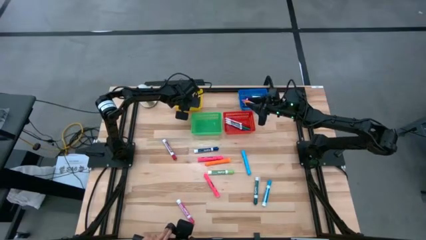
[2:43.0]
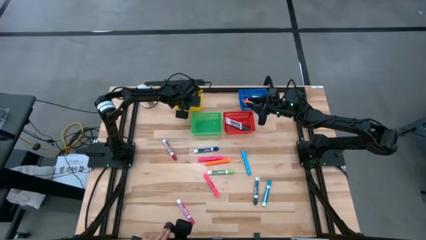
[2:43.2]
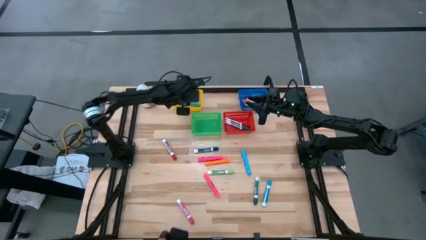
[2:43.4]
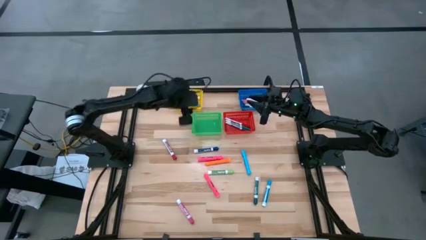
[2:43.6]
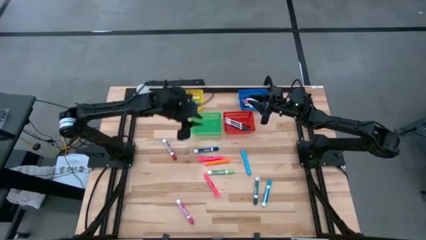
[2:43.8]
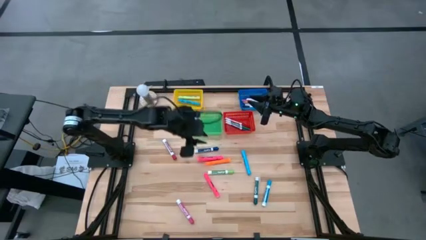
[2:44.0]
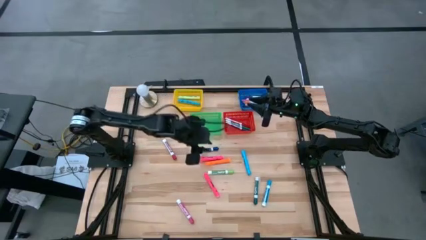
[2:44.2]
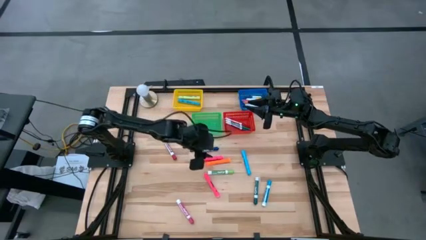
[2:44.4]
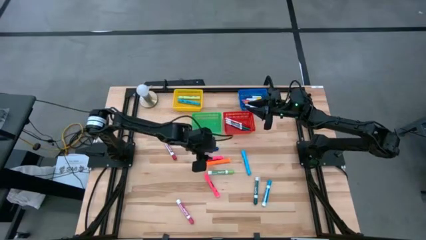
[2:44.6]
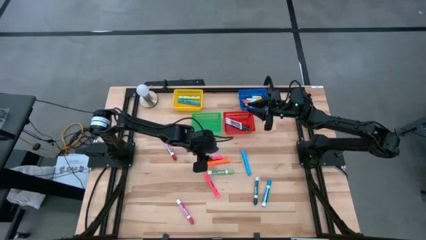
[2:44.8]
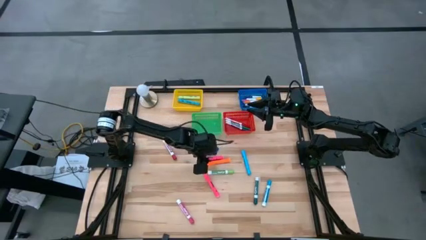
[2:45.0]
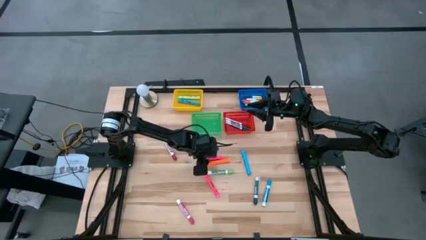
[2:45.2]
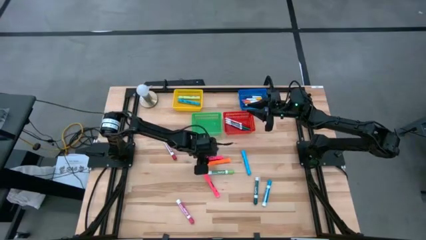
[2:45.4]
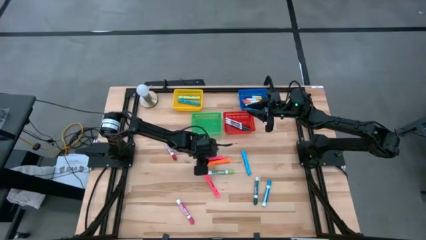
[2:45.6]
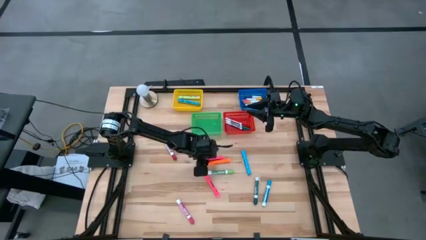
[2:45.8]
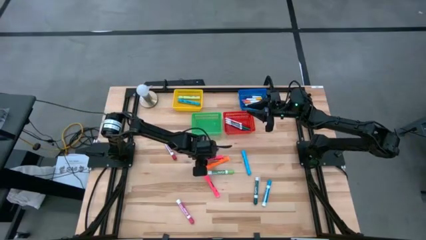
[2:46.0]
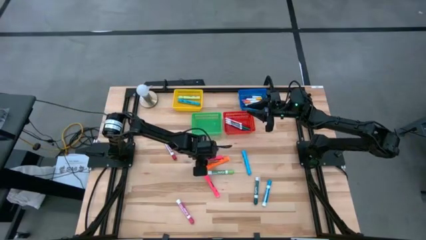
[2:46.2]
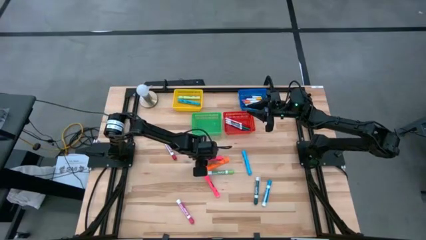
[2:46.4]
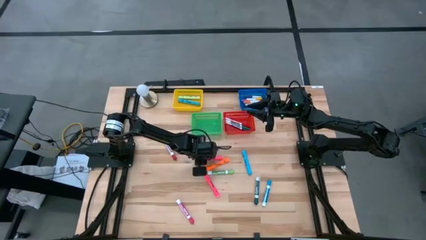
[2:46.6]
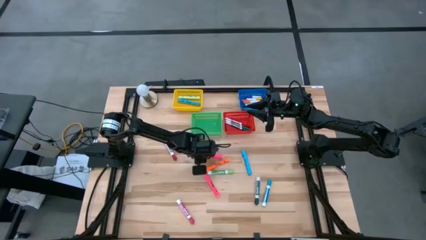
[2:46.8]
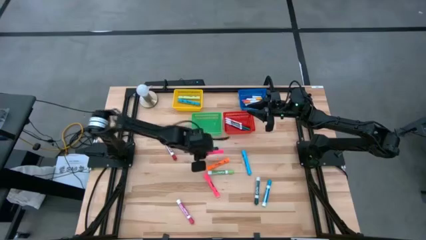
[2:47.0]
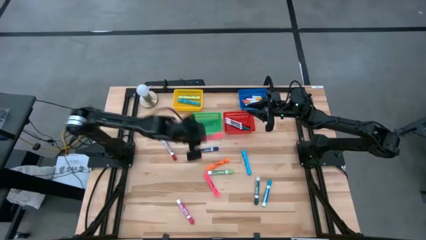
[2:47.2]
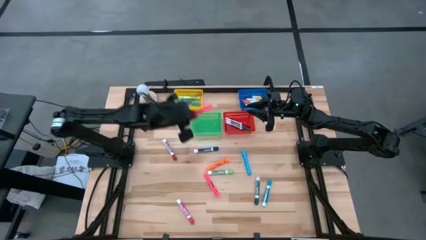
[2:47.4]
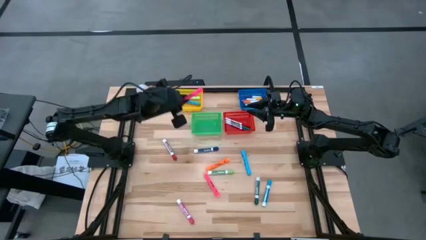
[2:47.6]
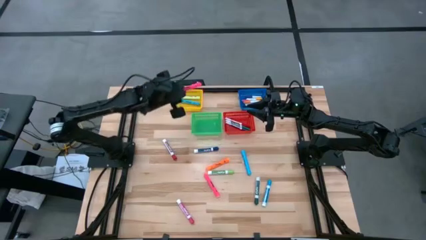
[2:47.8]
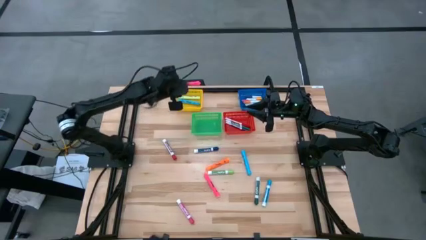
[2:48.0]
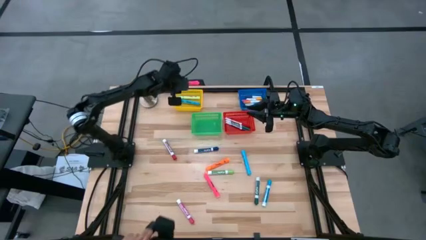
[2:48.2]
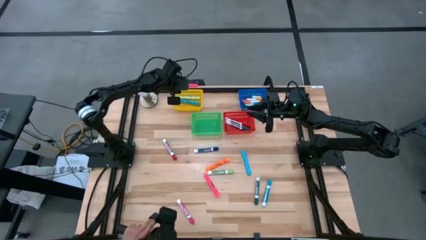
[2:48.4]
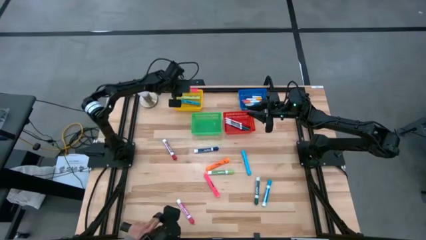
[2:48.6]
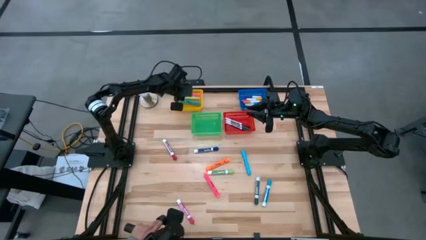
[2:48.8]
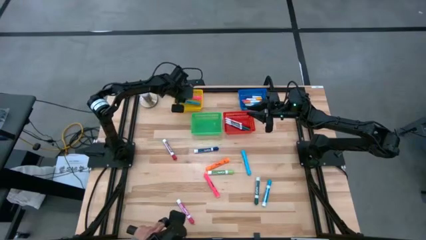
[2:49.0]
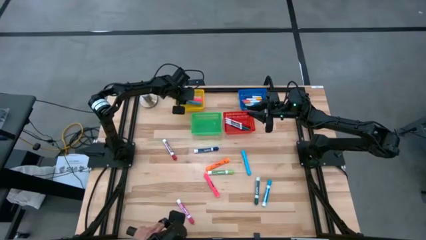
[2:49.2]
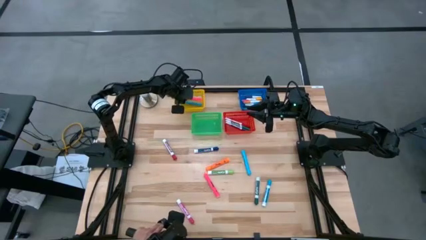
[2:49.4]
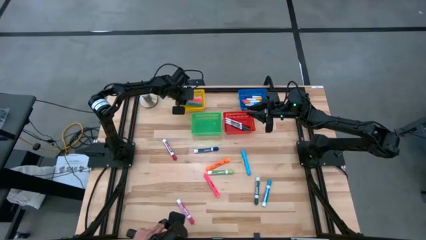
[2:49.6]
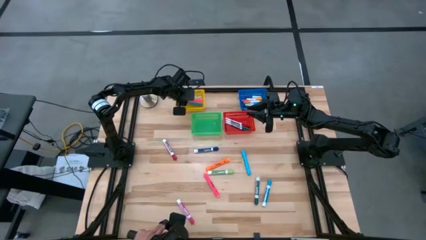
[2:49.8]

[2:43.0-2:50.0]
Task: Pick & Place Markers
Put the pink highlighter into the yellow bin

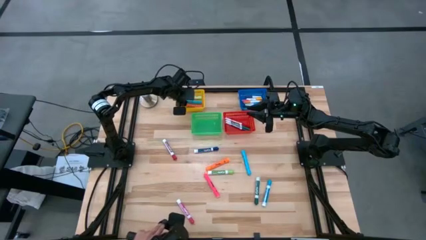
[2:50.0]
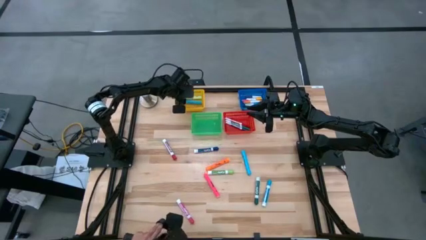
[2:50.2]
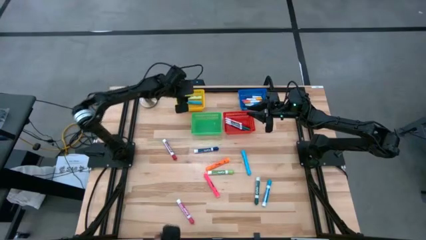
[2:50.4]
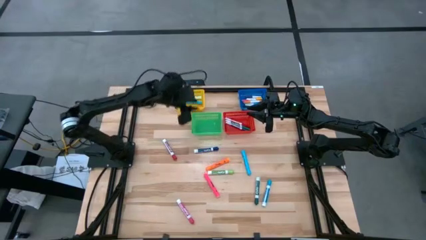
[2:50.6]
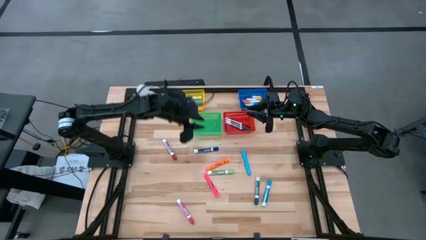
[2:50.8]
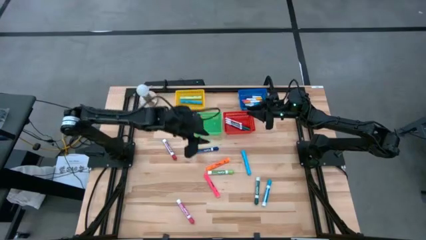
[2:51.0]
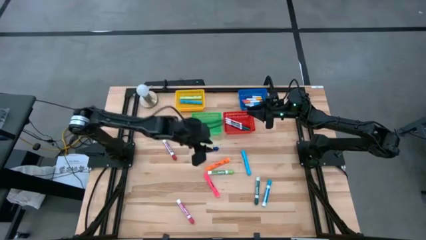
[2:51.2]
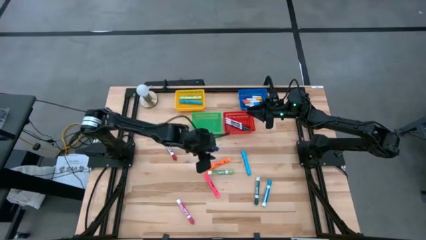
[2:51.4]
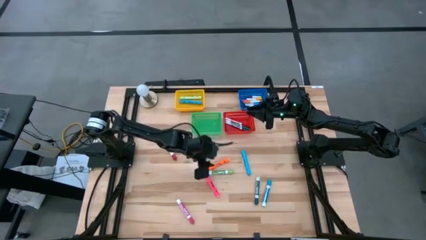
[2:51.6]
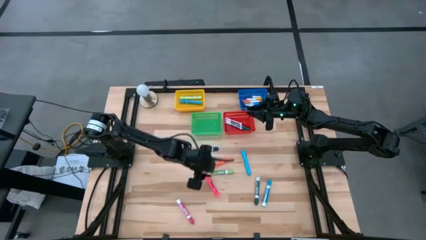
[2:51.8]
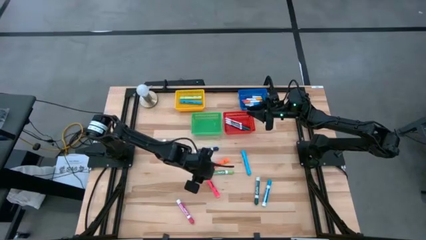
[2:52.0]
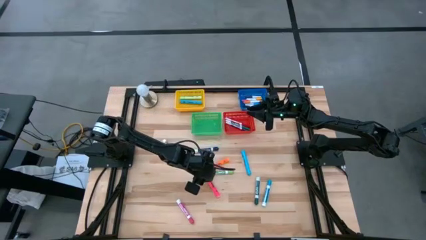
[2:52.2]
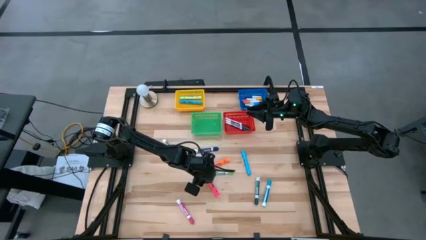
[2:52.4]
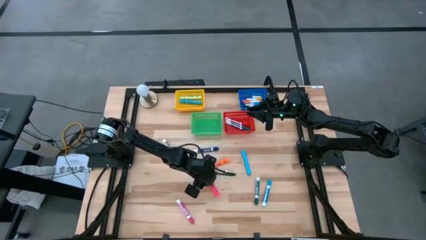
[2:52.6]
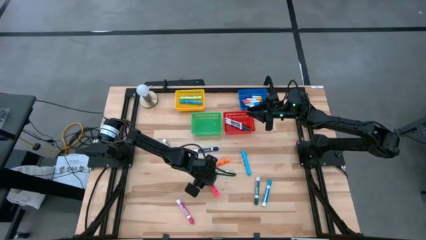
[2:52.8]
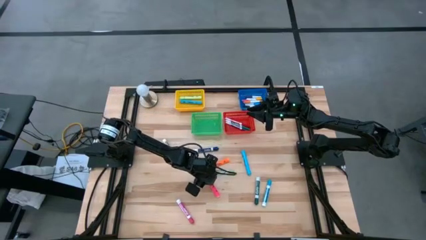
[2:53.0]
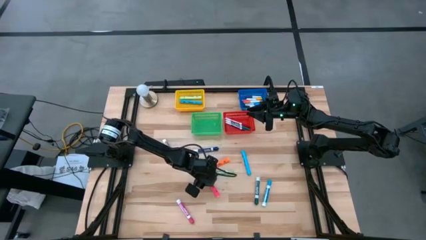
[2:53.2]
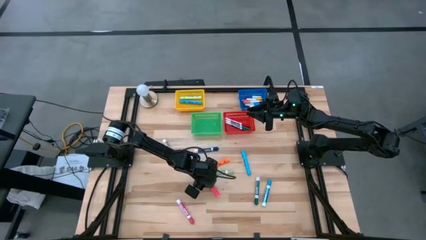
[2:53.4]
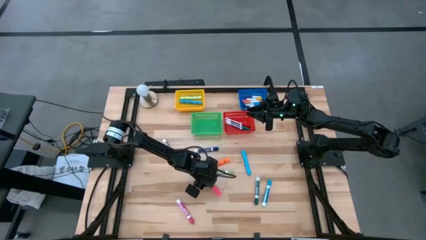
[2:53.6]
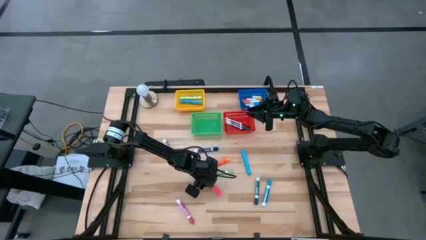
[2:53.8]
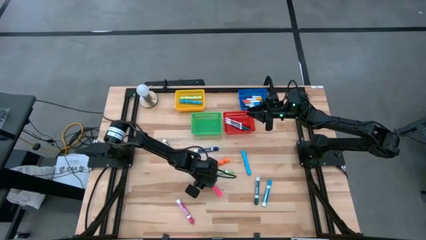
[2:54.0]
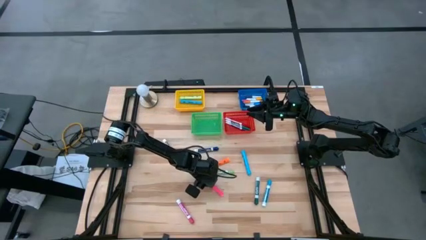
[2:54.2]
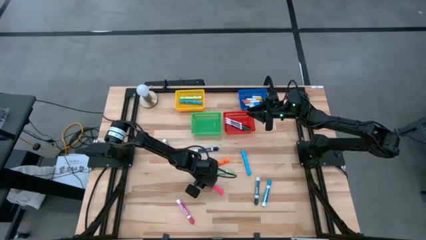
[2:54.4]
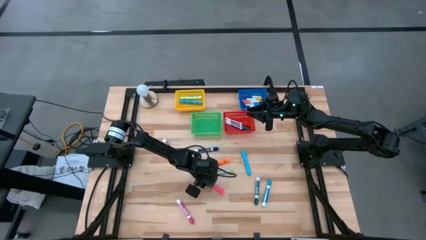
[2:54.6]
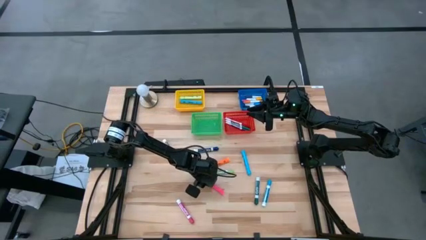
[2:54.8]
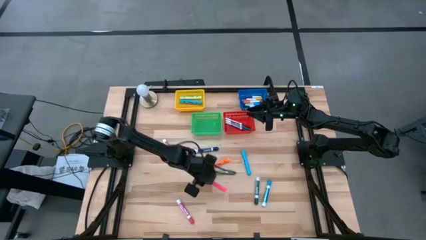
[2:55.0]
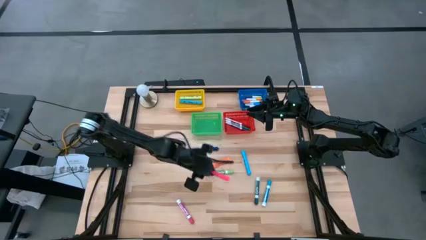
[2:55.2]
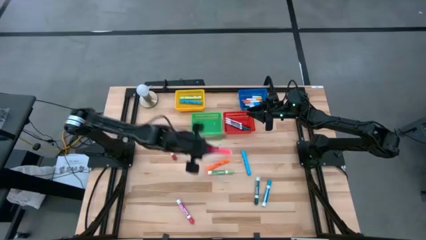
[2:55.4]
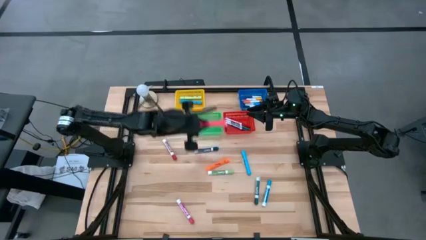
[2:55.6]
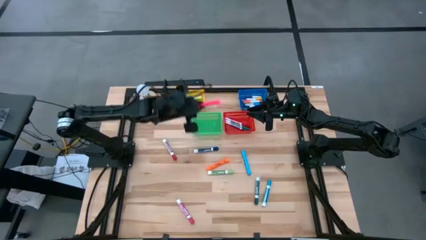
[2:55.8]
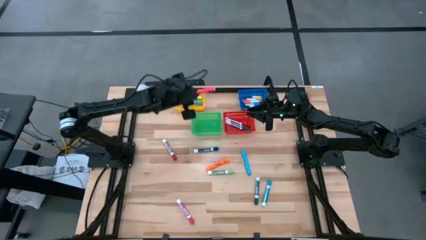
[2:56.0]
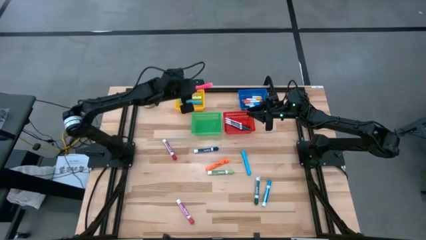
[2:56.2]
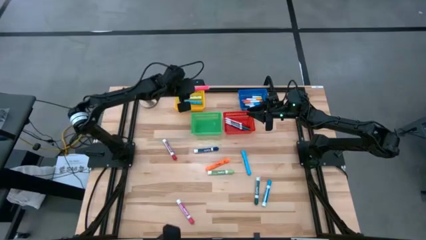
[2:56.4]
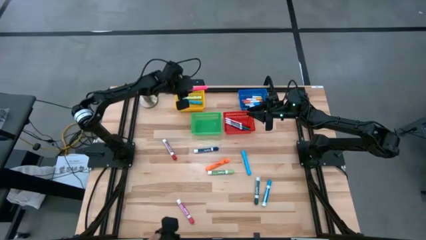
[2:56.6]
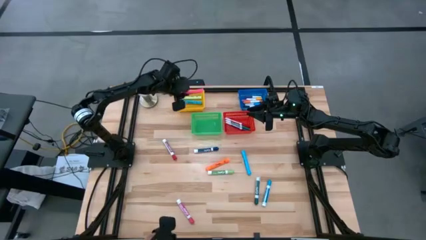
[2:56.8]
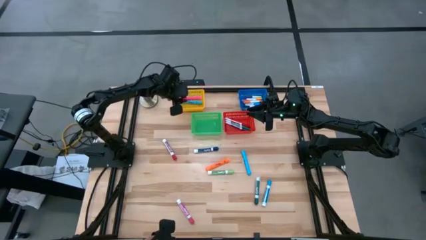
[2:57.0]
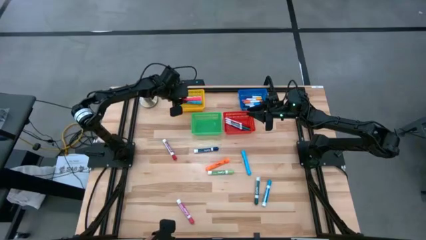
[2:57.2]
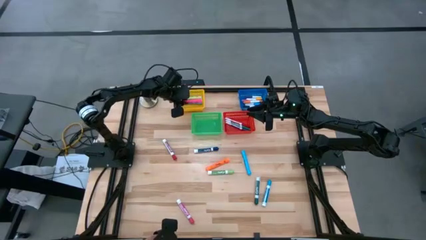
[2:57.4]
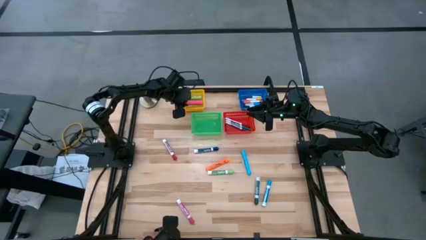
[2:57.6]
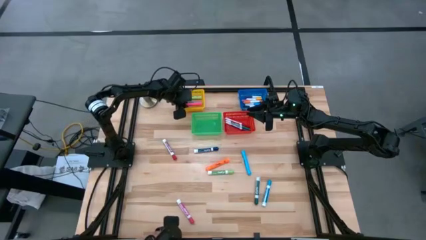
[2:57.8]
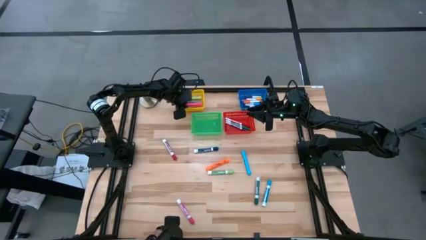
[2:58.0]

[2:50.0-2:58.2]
Put the pink highlighter into the yellow bin
